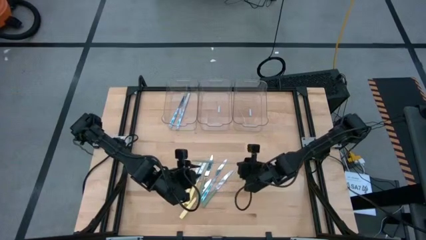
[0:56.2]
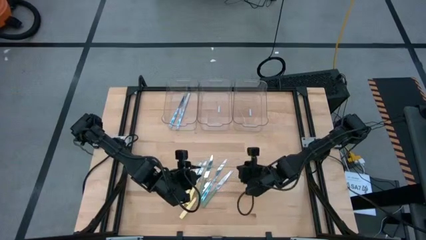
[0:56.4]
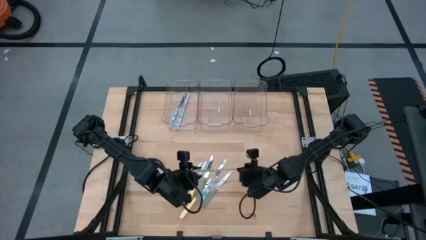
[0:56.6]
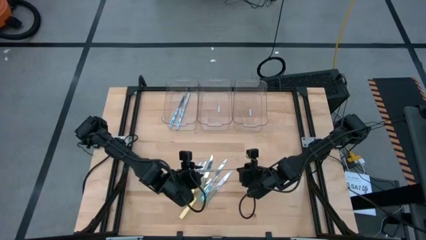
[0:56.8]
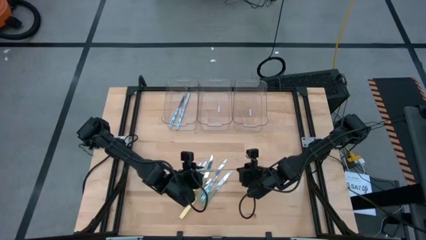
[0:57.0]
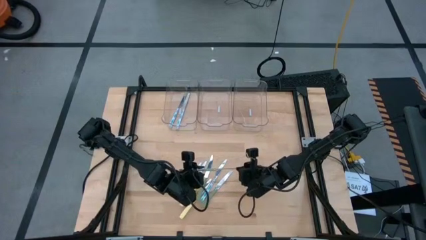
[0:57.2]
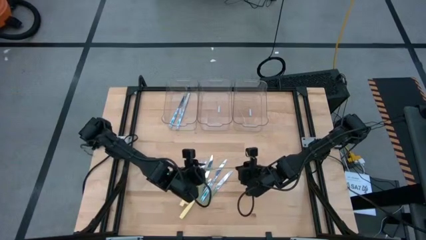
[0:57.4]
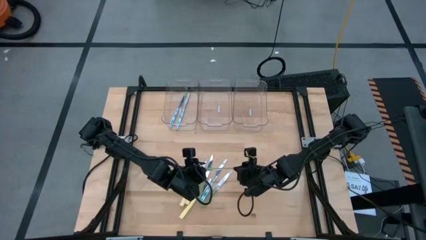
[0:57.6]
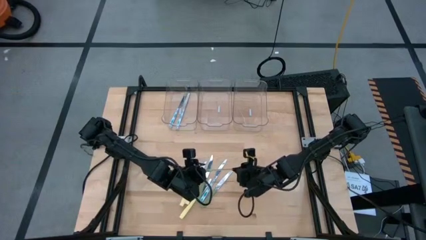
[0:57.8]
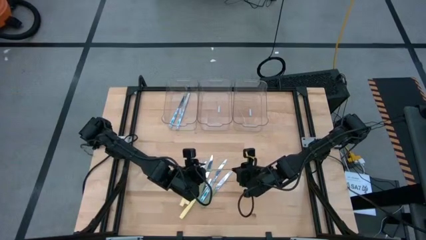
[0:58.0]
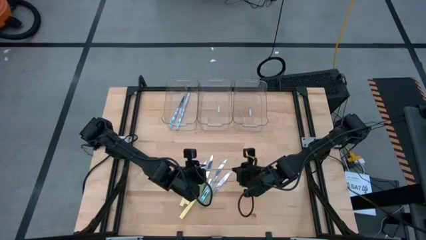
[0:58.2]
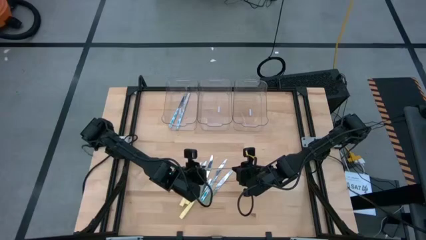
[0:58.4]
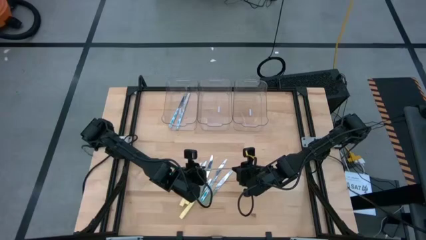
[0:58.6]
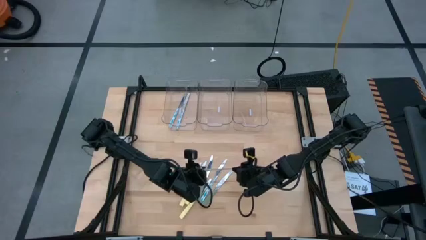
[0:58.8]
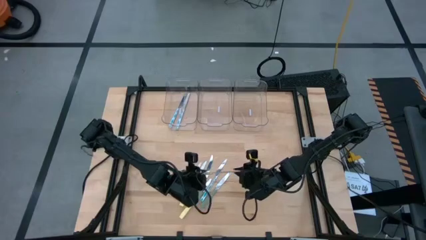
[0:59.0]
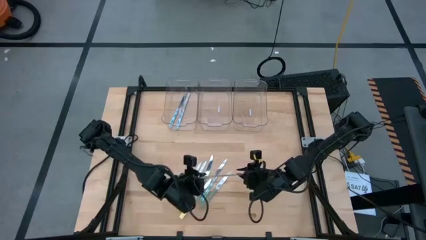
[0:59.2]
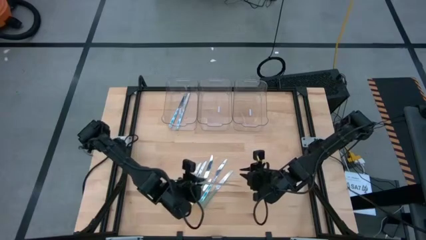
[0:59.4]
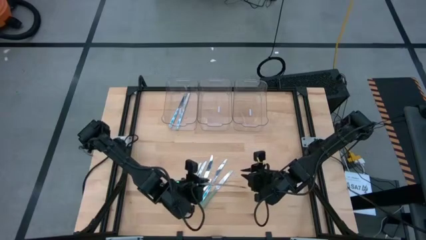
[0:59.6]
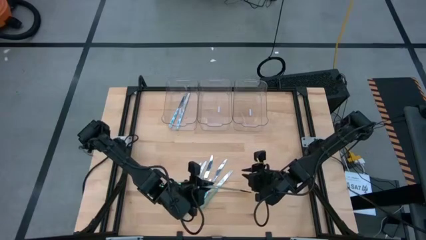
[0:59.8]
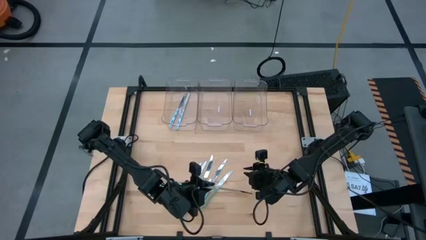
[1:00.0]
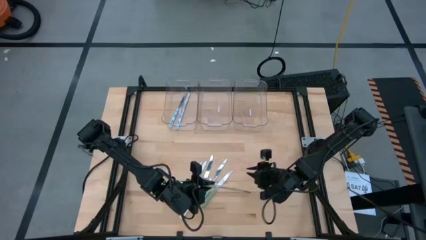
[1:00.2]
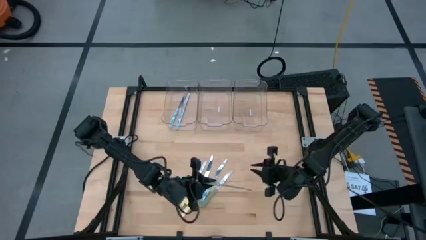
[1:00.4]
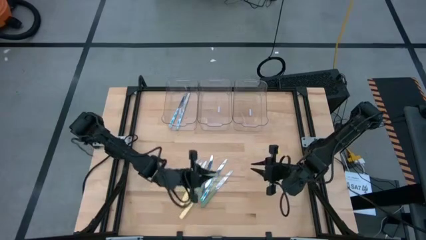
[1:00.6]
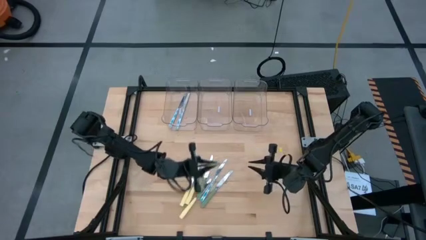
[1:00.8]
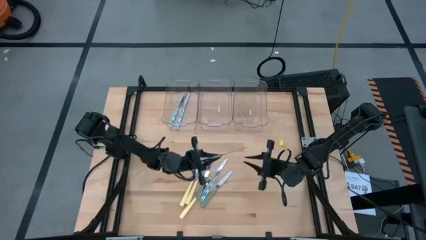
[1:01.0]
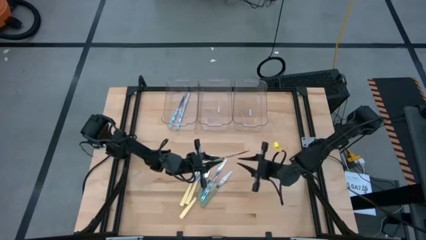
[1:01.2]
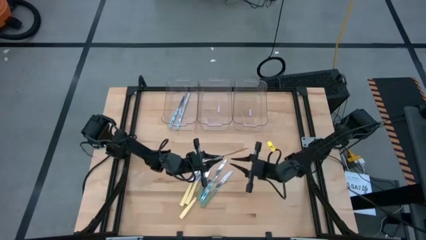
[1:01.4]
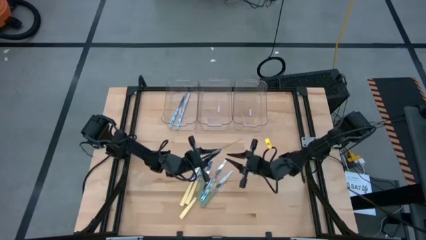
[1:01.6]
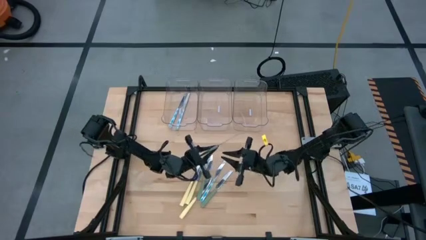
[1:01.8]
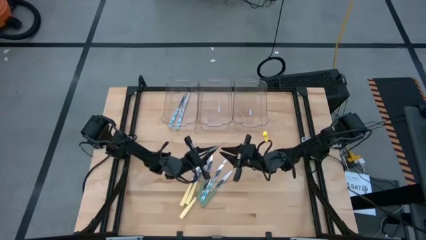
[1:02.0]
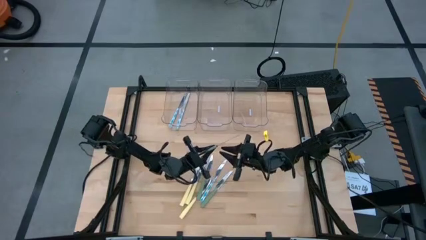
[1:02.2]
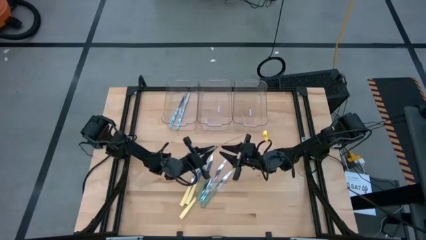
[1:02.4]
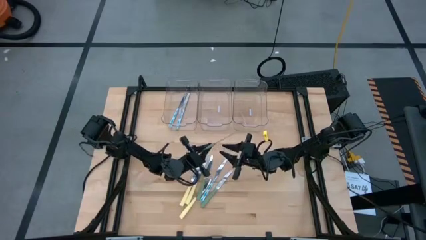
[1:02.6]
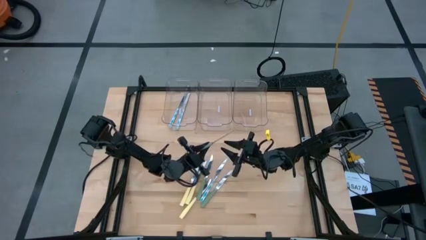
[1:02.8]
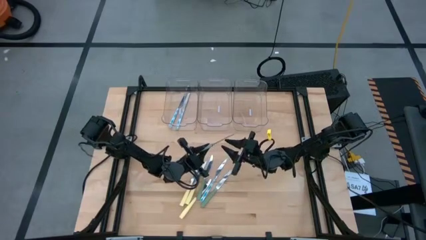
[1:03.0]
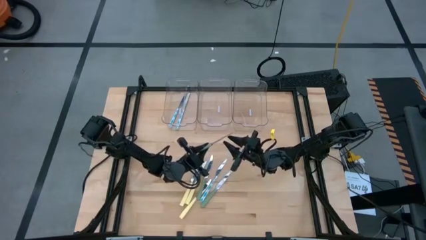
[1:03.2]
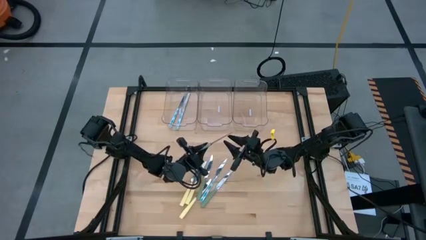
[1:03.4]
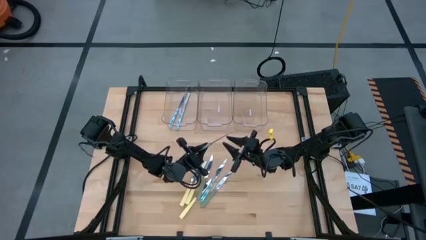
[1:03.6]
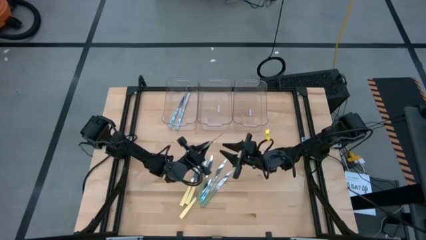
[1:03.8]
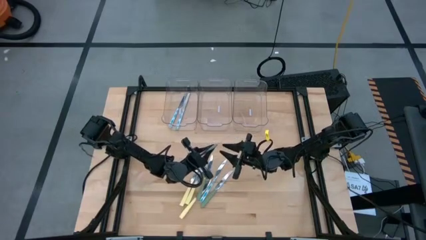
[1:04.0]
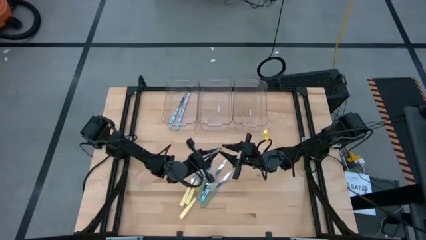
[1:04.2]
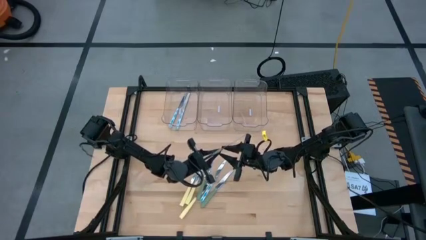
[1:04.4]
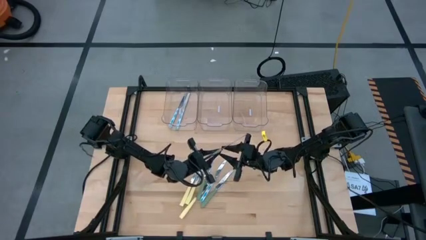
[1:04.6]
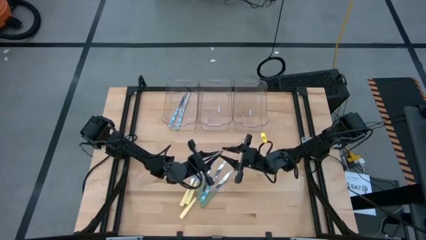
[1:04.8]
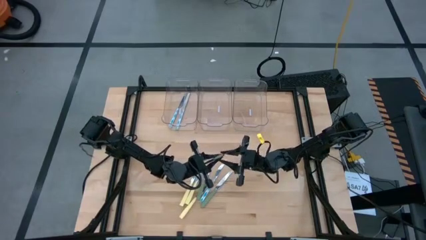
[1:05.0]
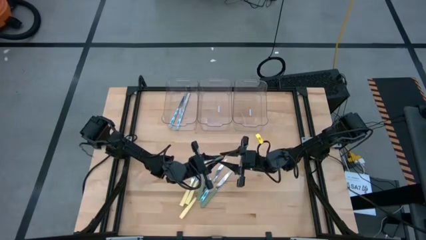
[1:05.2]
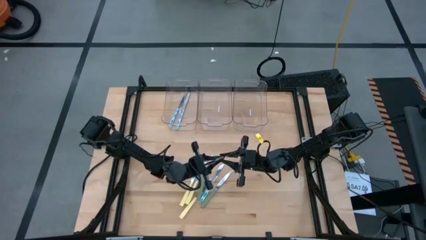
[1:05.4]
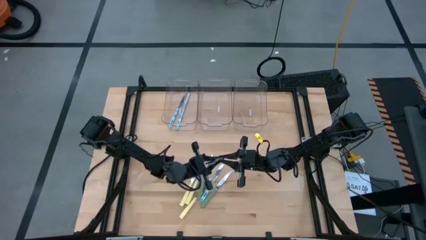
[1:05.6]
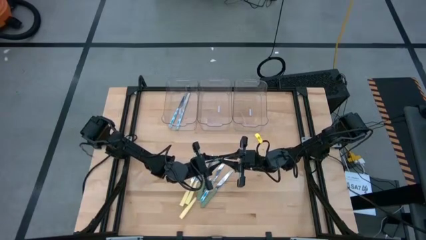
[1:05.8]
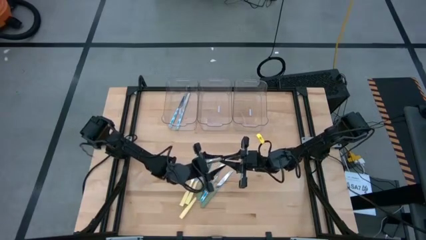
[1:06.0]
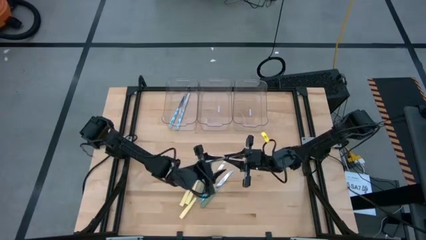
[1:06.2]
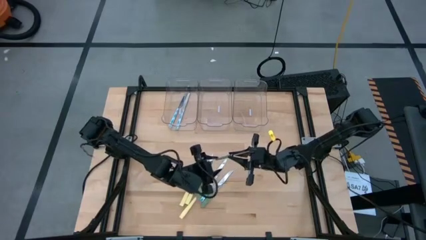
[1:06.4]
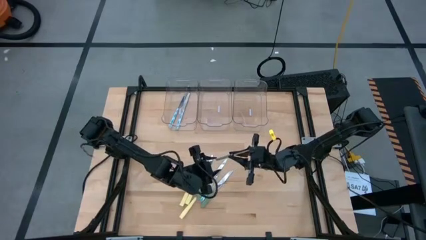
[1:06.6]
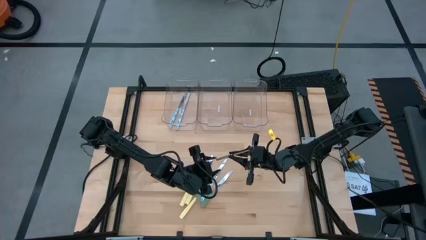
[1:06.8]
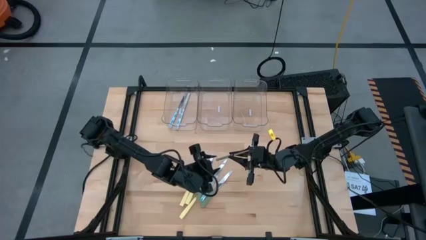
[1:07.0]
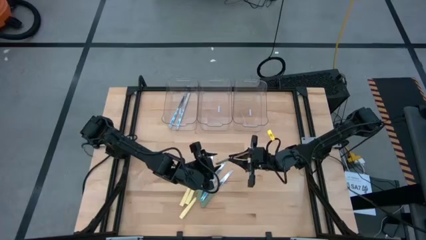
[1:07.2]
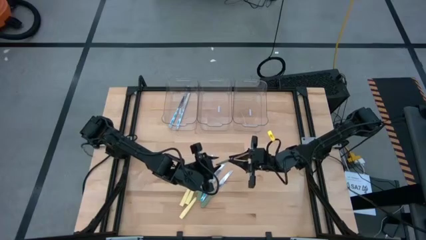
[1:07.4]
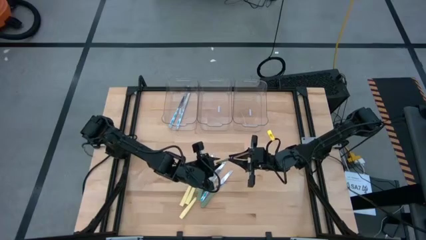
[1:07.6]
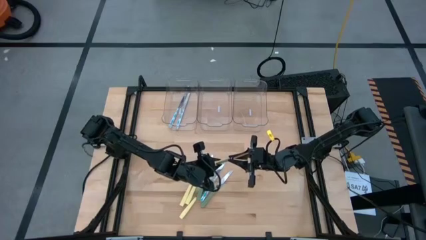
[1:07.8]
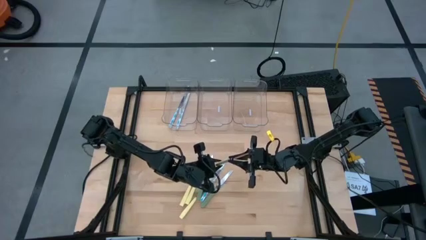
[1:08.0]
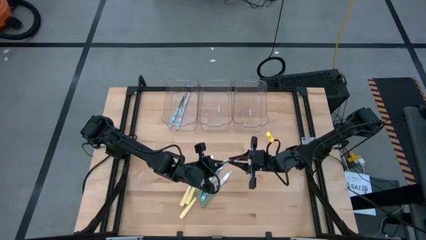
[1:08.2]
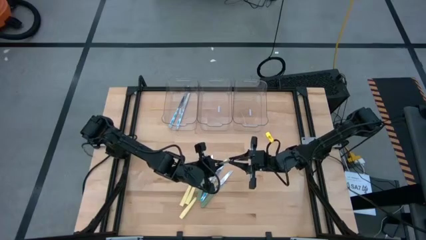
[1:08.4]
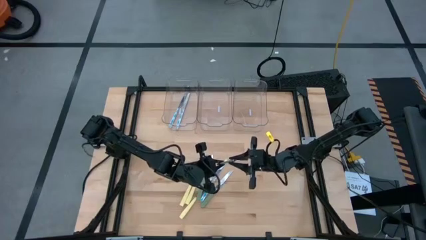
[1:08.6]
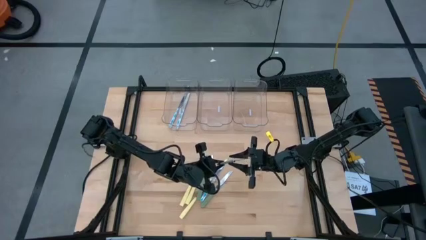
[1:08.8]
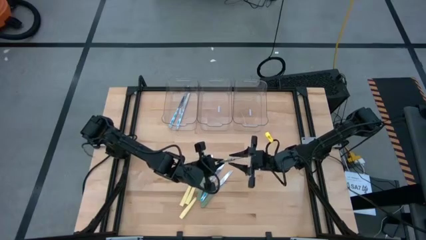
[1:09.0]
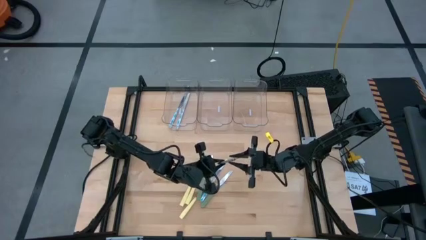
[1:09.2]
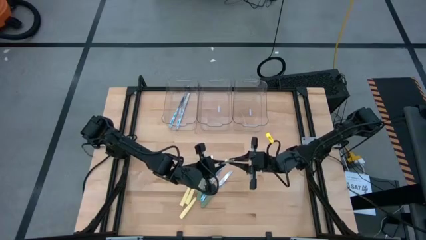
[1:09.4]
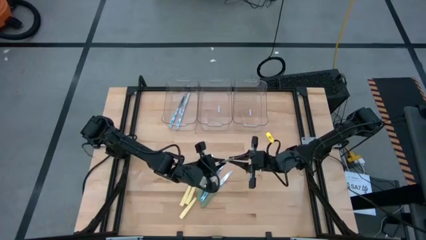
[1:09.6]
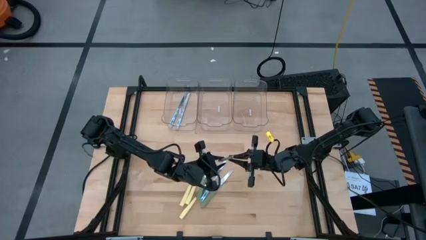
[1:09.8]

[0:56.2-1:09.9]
Task: Sort silverware by color (type)
Put the green knife into the right transparent bin

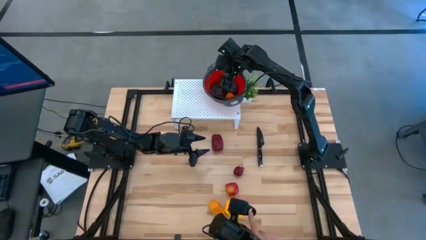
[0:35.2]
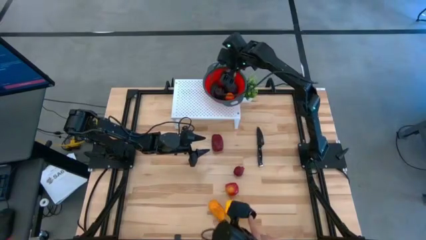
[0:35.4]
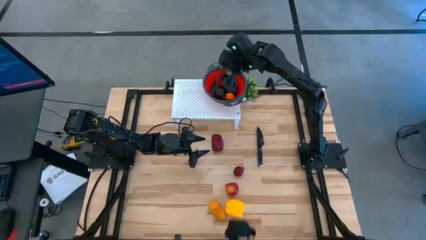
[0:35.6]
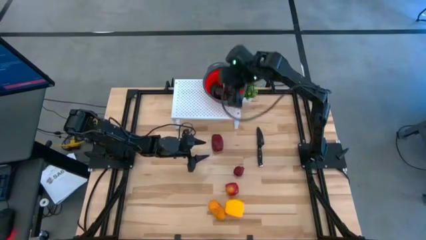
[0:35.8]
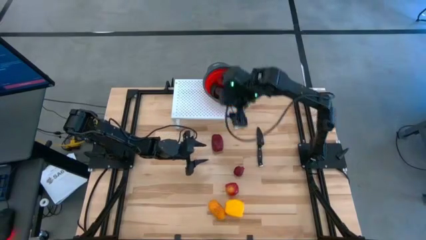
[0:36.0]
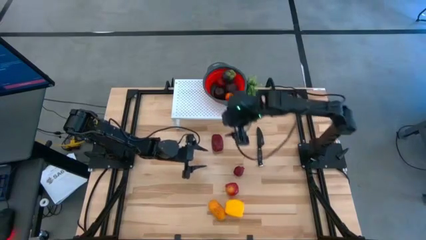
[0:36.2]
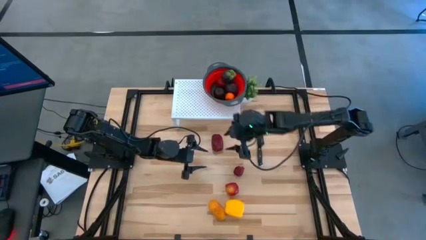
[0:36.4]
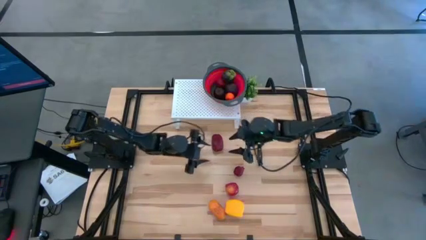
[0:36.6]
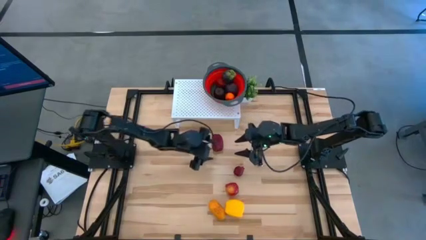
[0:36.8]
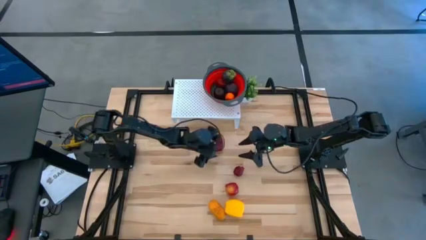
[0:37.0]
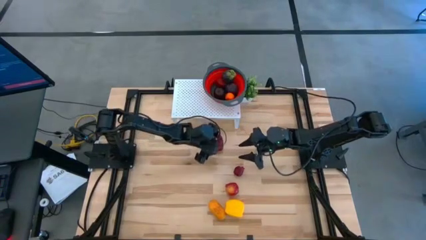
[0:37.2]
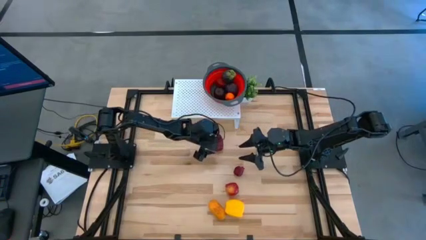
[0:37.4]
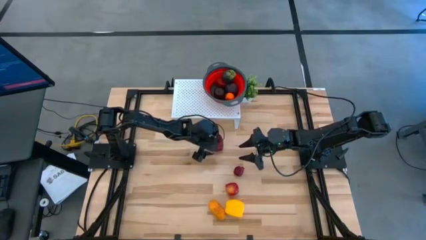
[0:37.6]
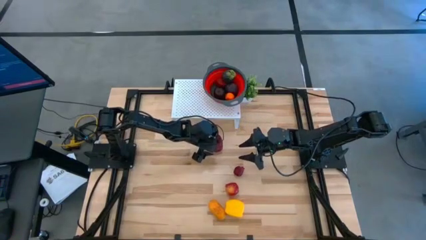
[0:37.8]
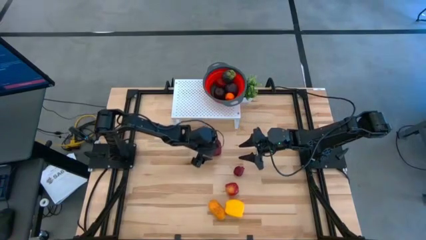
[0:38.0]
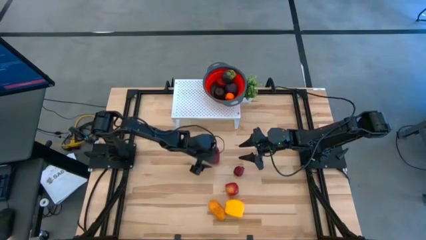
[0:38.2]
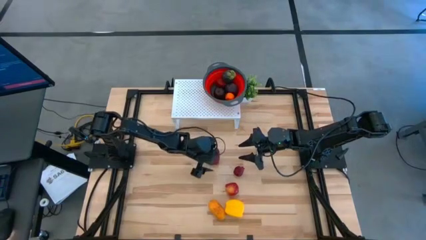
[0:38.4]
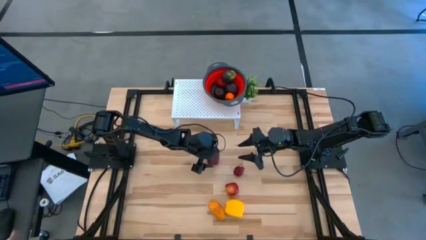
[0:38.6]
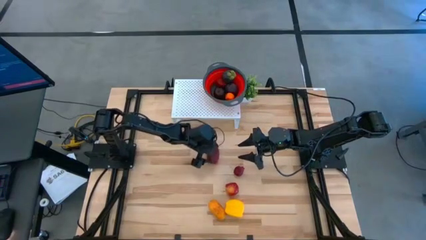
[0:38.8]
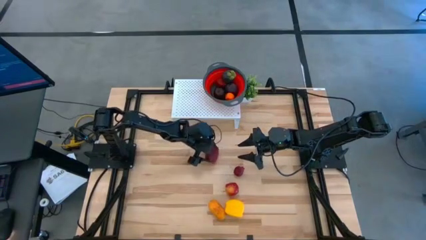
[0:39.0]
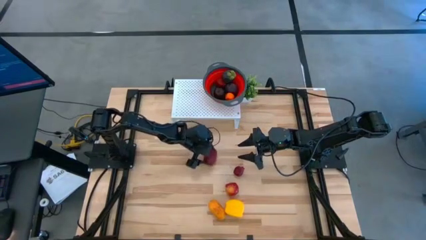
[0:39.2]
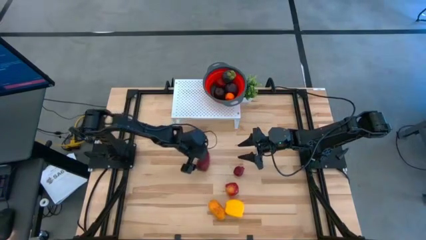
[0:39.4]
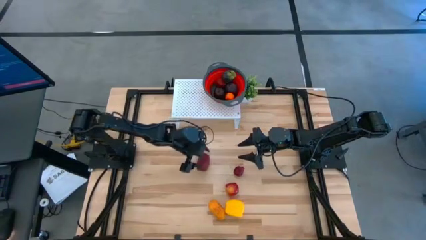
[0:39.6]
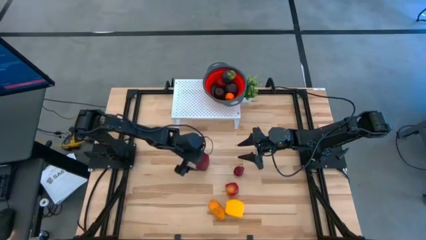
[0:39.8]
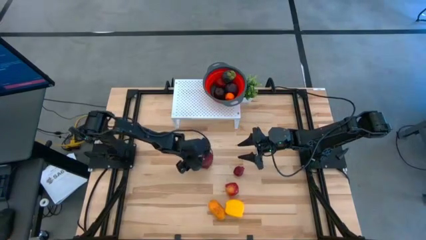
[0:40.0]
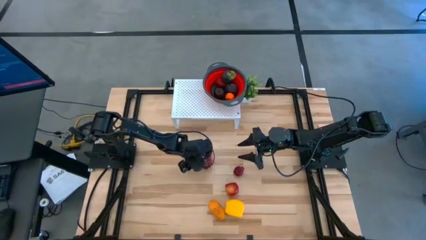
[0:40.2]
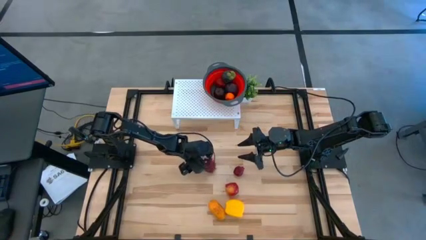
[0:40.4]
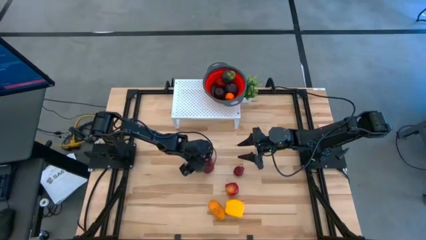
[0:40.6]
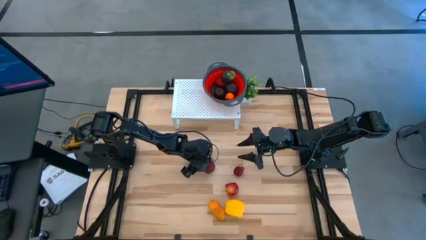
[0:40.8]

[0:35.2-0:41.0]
Task: Pick & Place Fruit
Put the top red apple into the red strainer bowl
